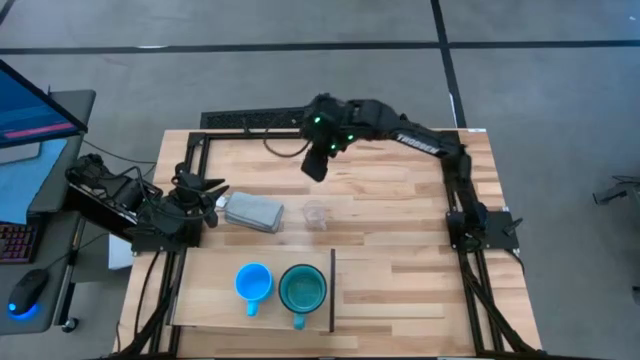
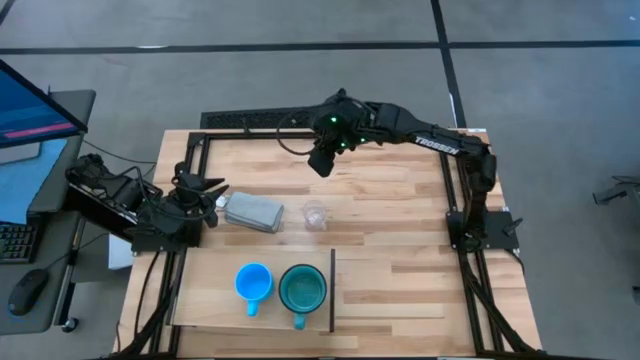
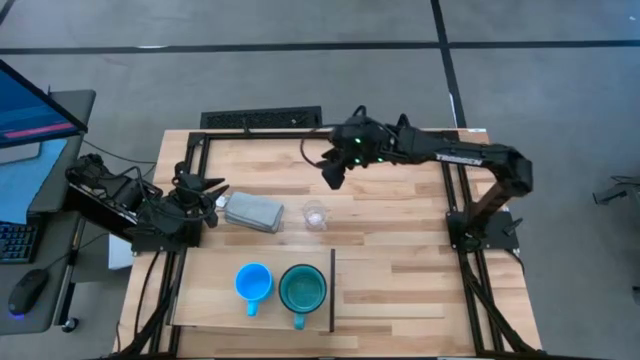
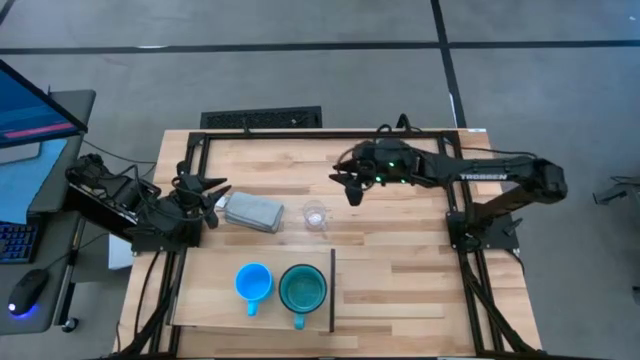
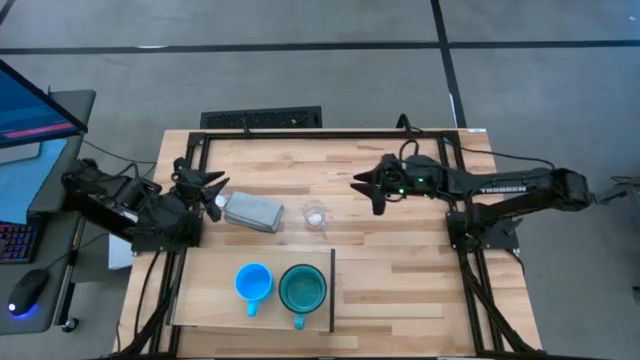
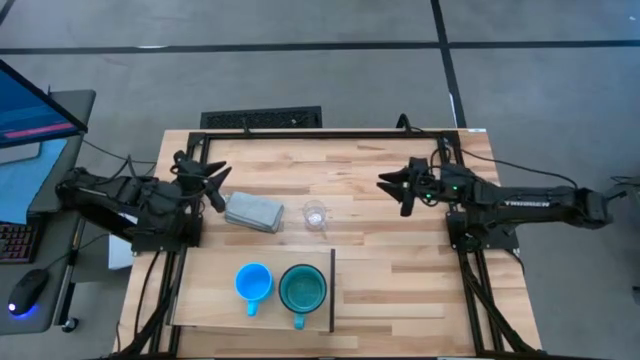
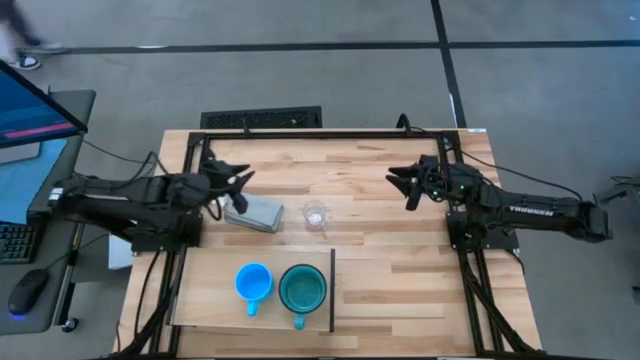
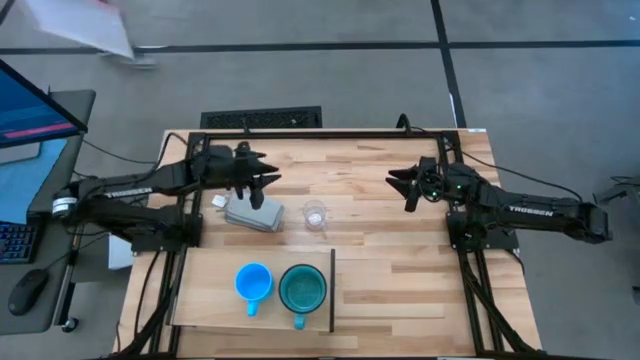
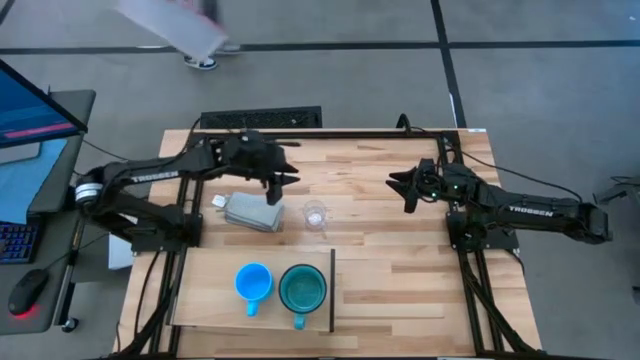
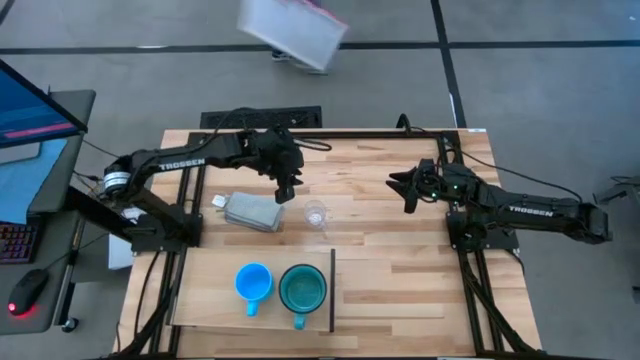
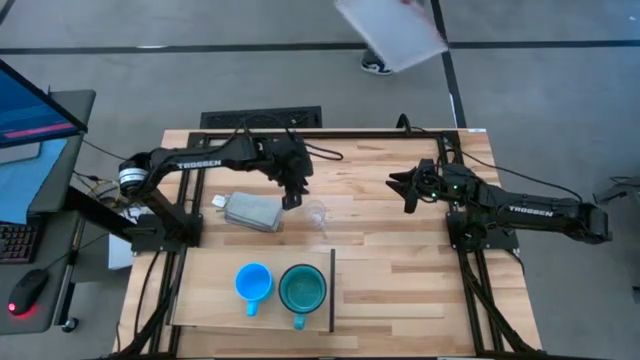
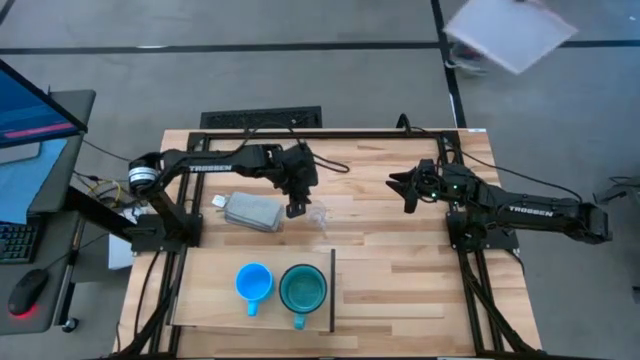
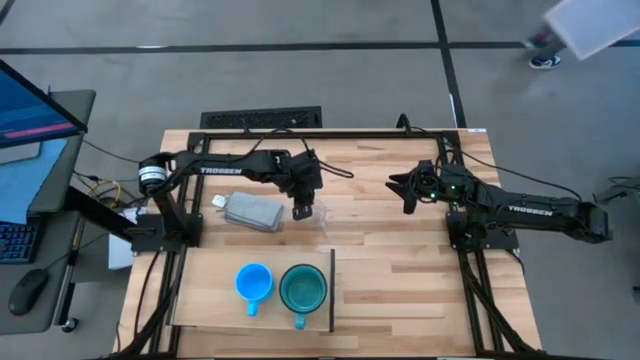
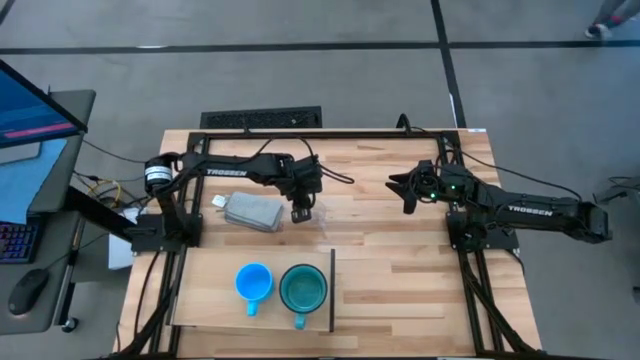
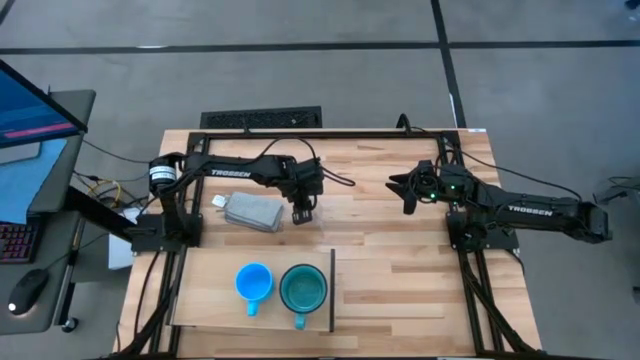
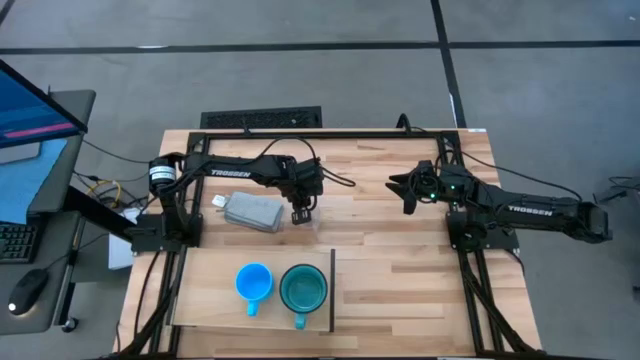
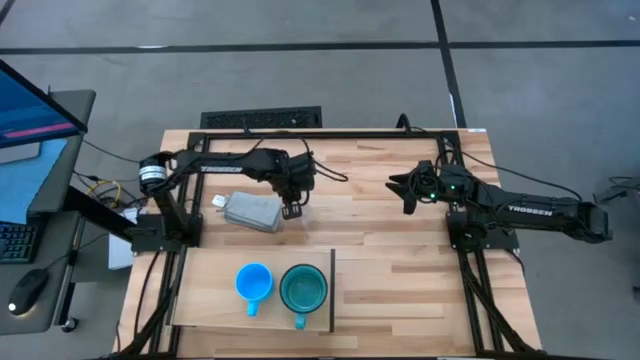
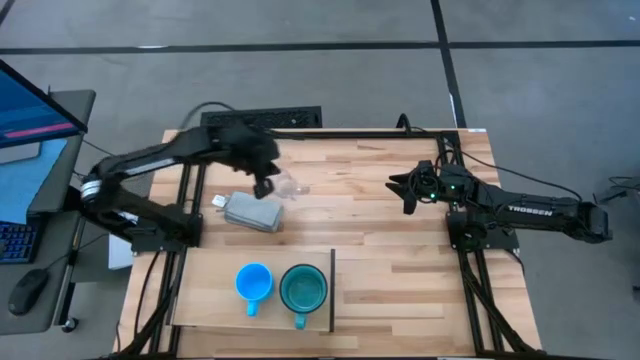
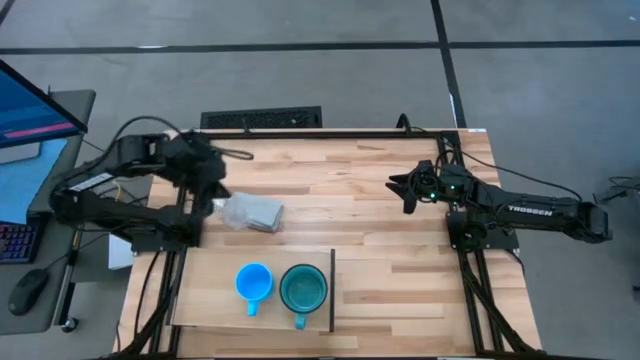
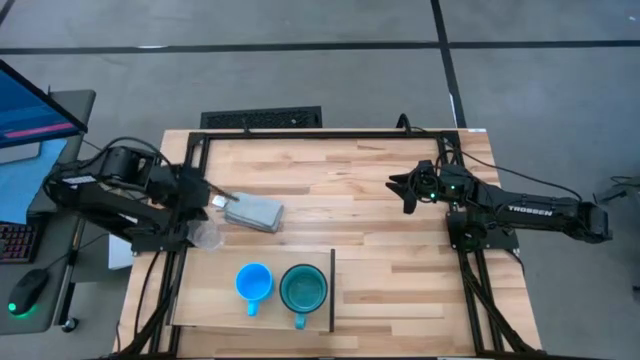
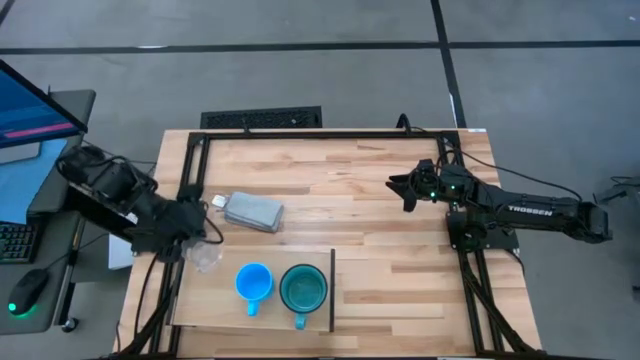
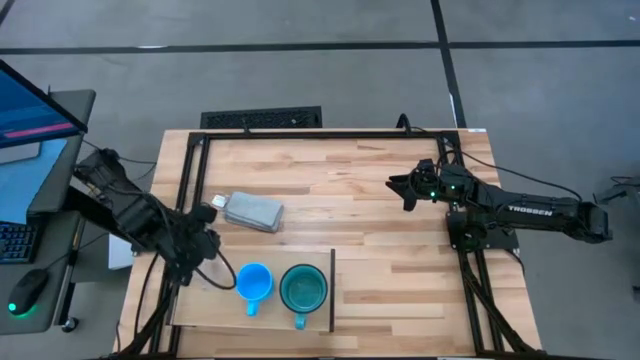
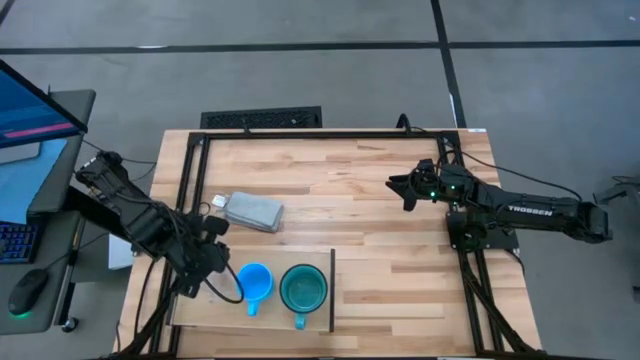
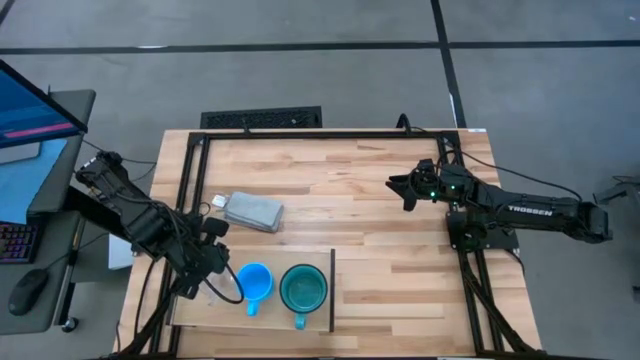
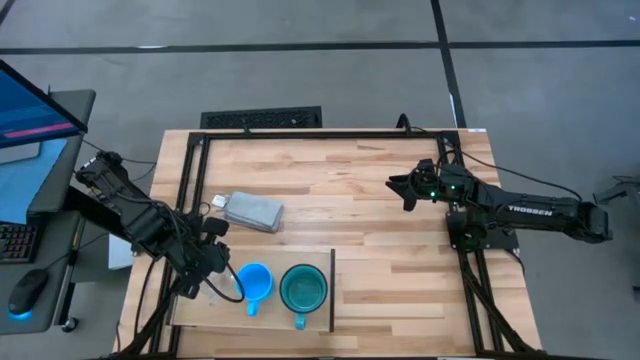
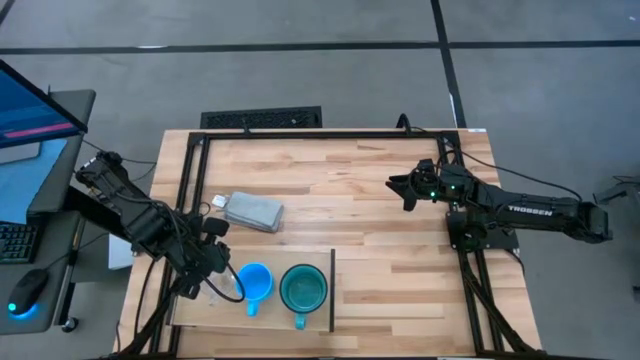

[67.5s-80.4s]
Task: Stack small to large cups/mugs on shelf
Put the transparent mug on the shelf

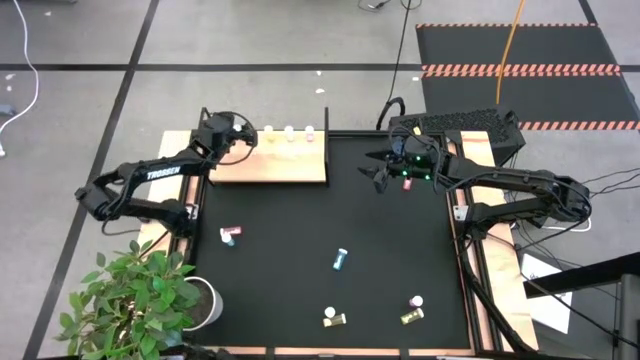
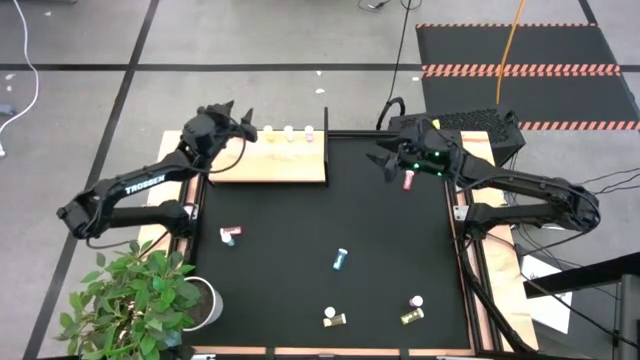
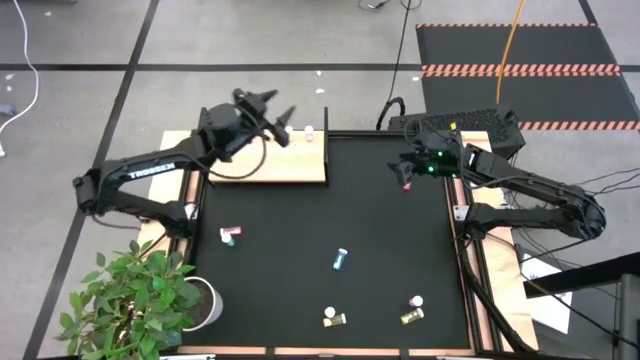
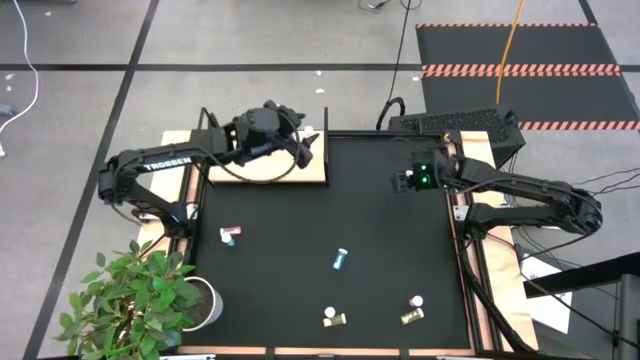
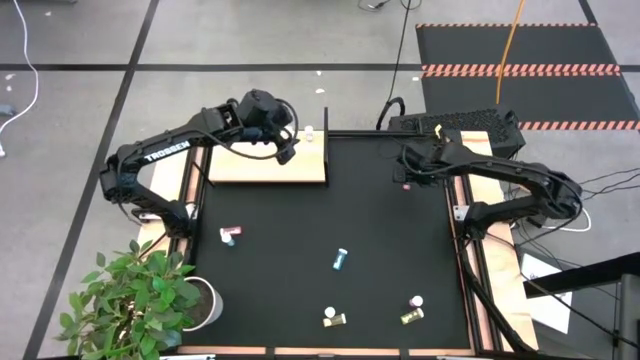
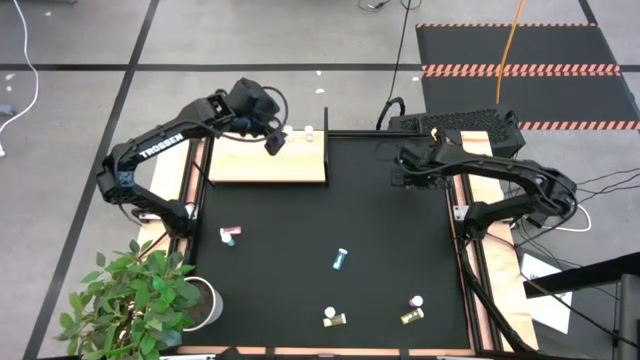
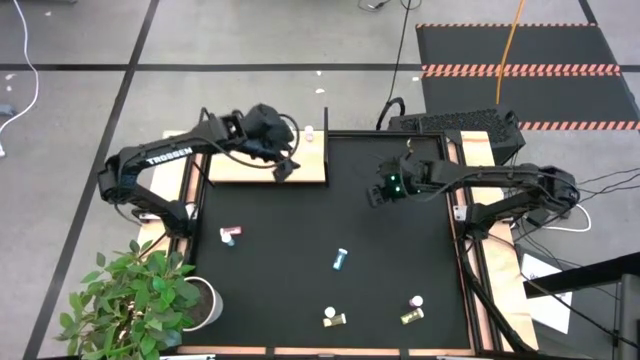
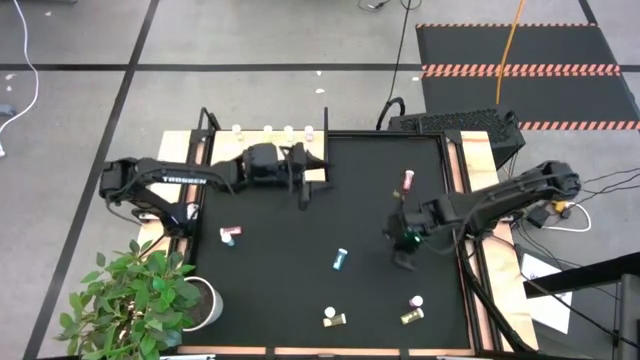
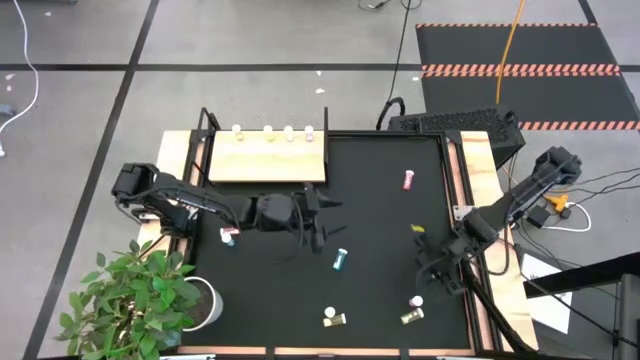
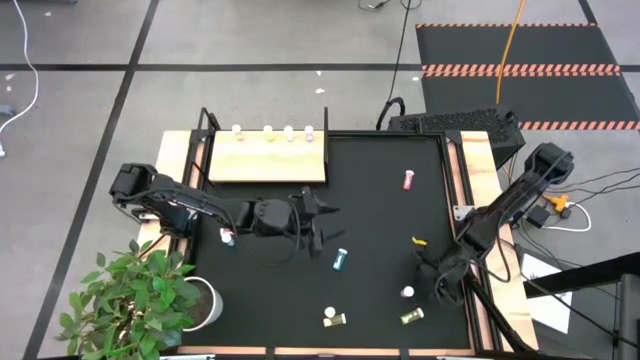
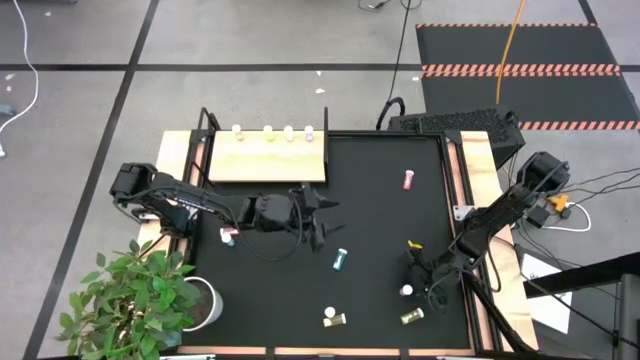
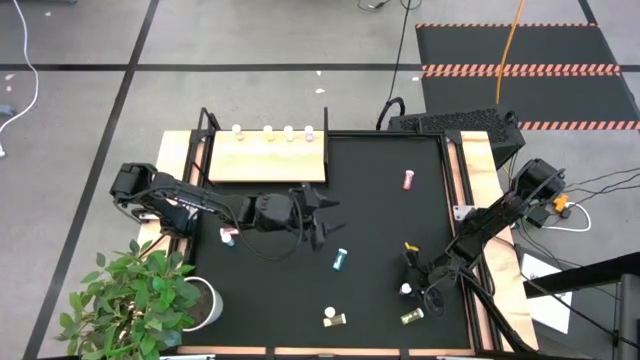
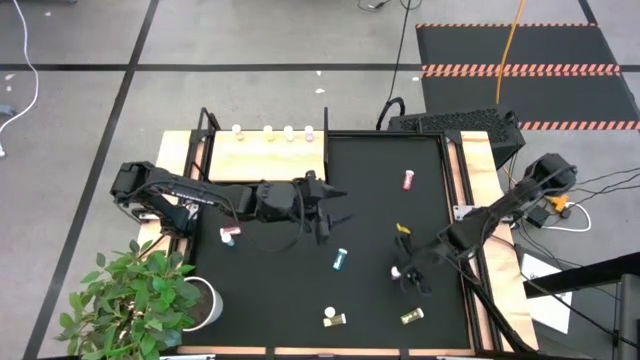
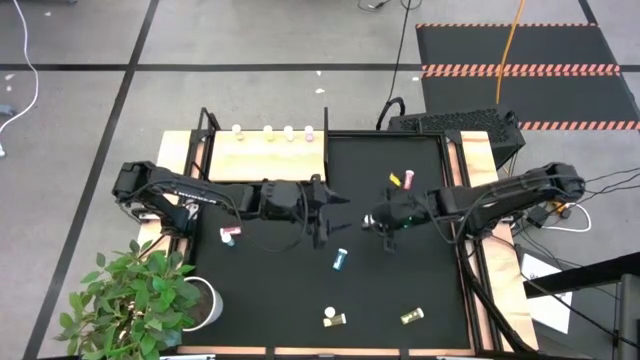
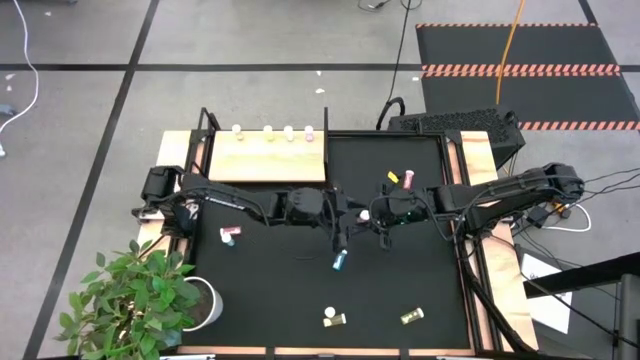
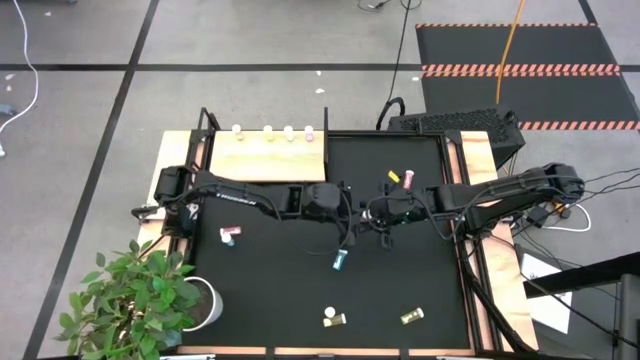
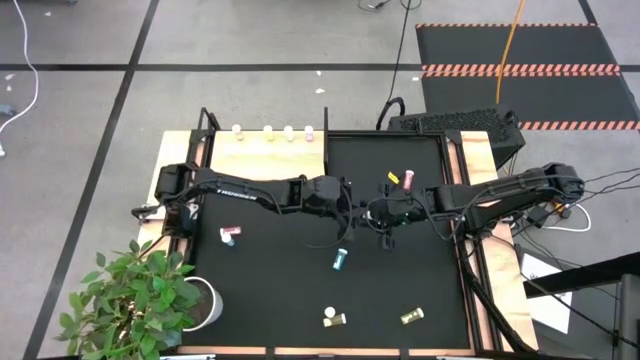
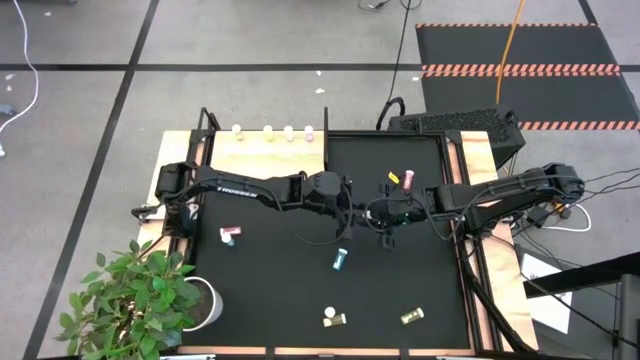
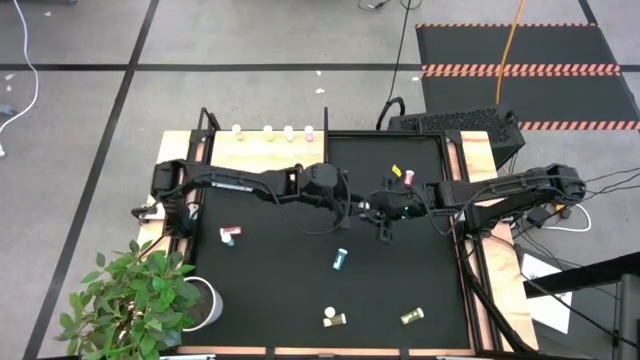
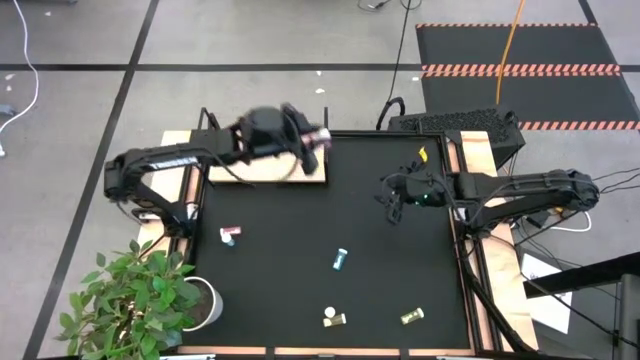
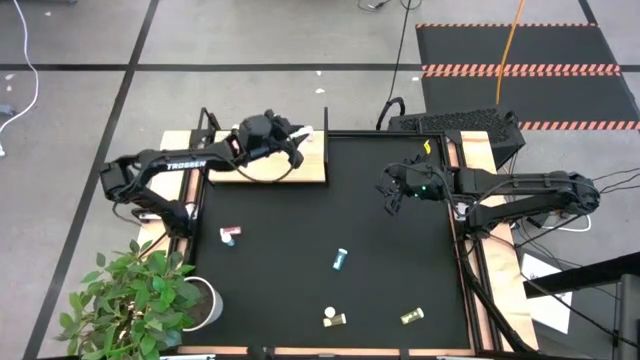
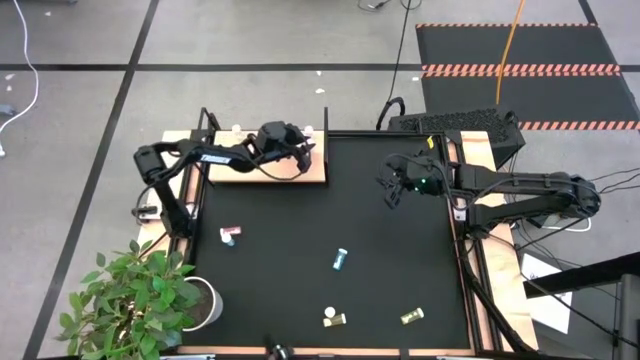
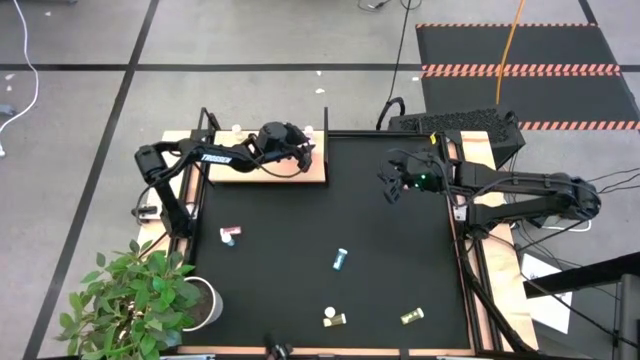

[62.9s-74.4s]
Task: Pick and place medicine bottles onto shelf by color
Put the right purple pill bottle on the shelf aligned with the other purple pill bottle
